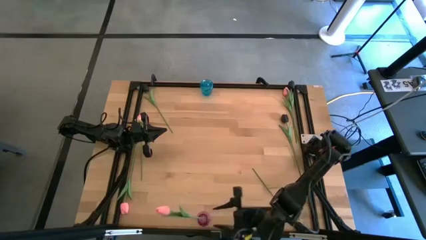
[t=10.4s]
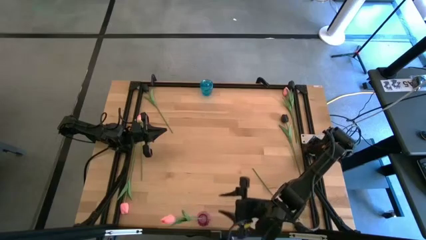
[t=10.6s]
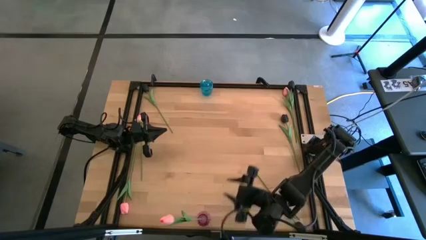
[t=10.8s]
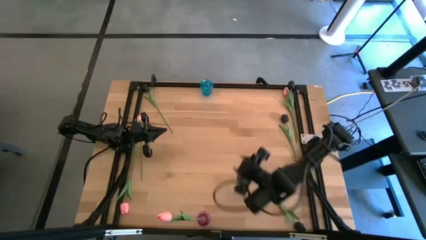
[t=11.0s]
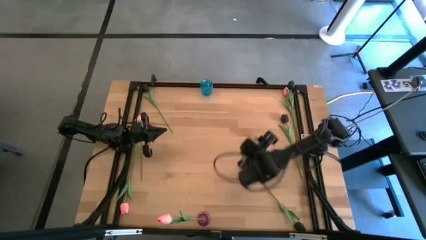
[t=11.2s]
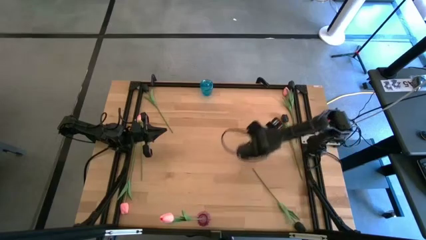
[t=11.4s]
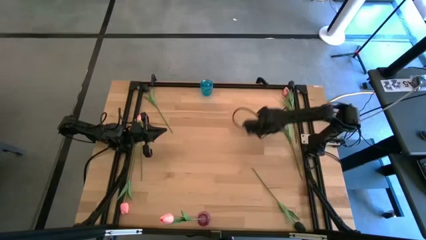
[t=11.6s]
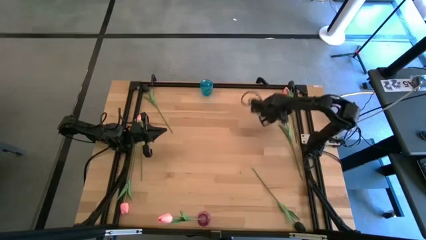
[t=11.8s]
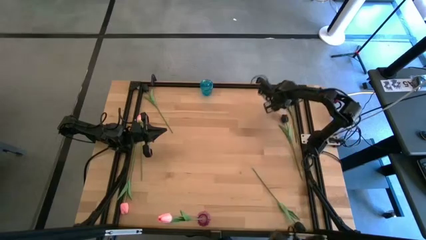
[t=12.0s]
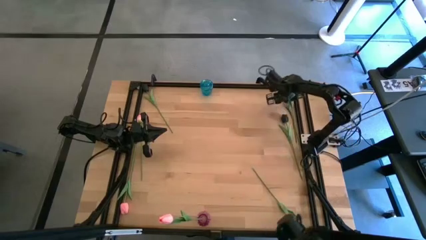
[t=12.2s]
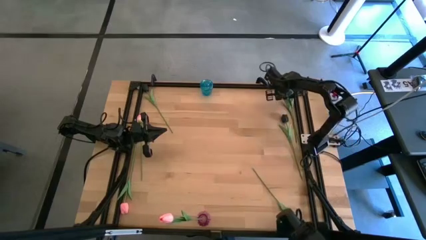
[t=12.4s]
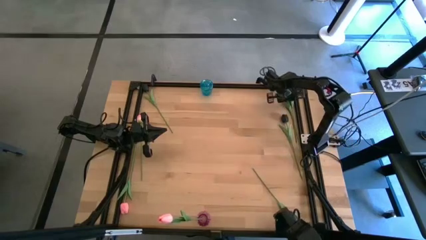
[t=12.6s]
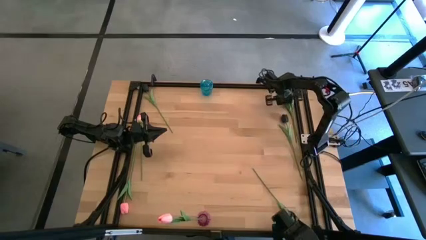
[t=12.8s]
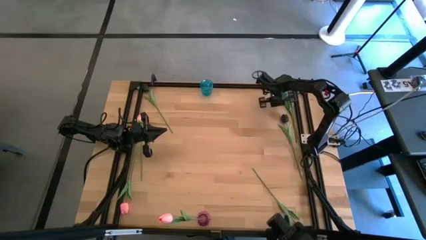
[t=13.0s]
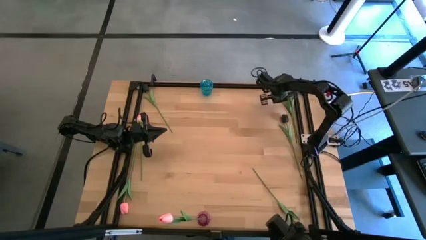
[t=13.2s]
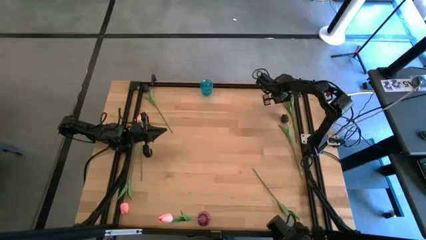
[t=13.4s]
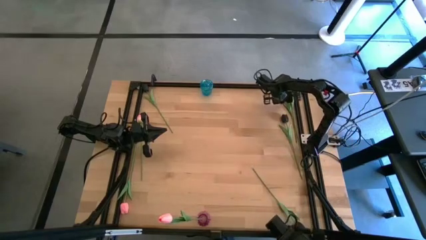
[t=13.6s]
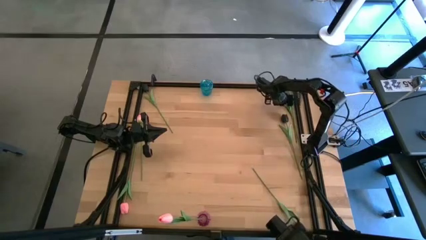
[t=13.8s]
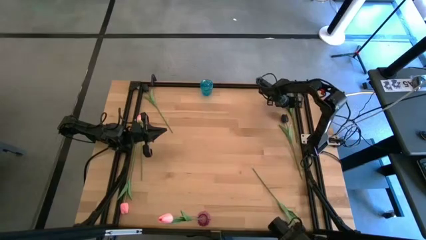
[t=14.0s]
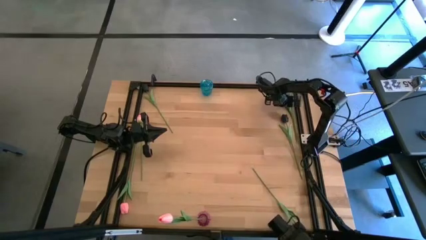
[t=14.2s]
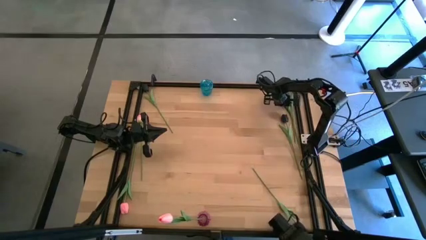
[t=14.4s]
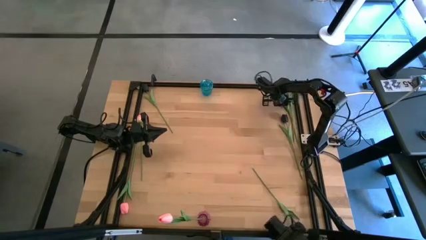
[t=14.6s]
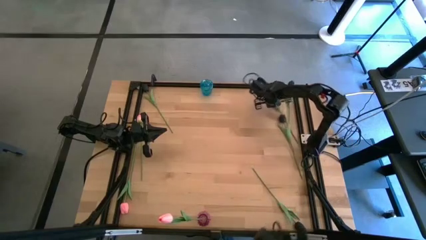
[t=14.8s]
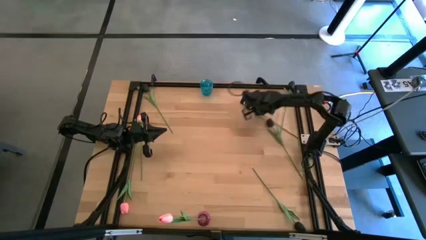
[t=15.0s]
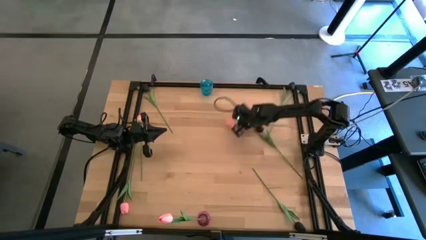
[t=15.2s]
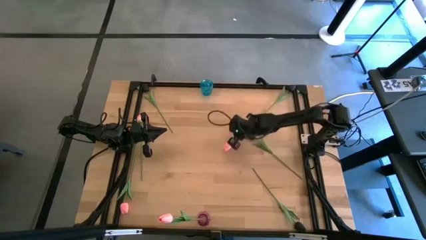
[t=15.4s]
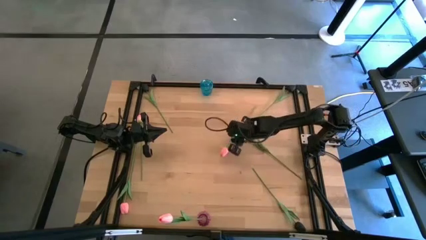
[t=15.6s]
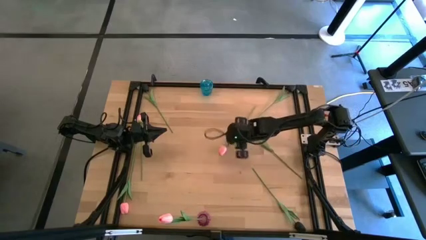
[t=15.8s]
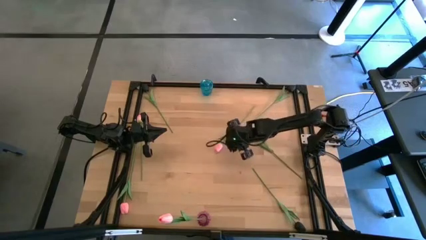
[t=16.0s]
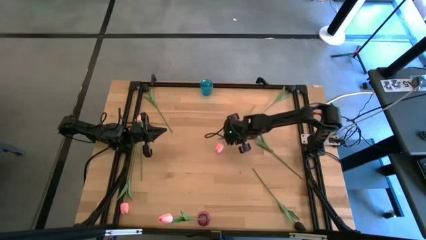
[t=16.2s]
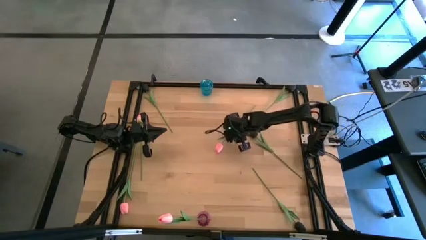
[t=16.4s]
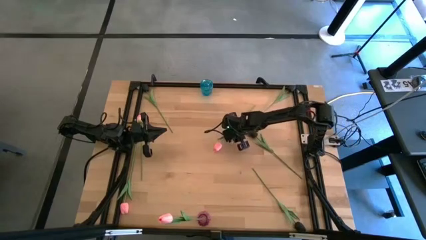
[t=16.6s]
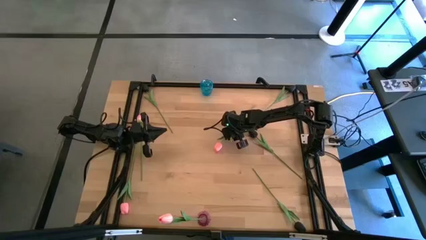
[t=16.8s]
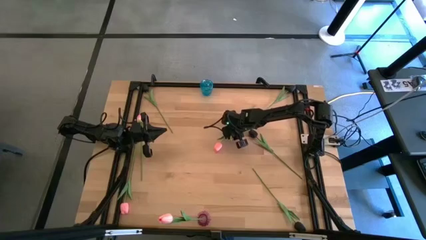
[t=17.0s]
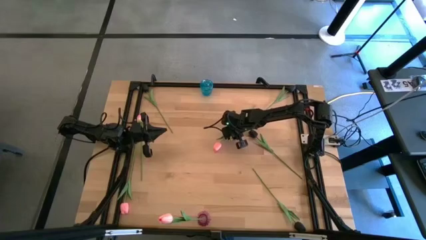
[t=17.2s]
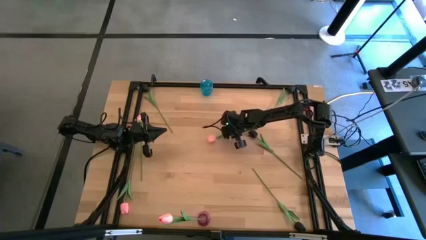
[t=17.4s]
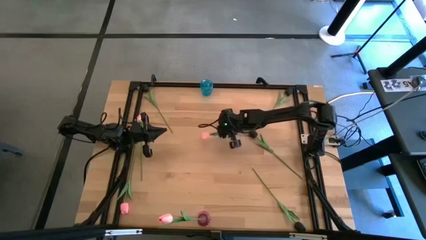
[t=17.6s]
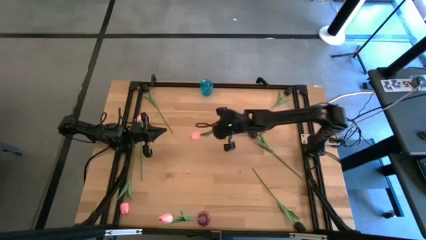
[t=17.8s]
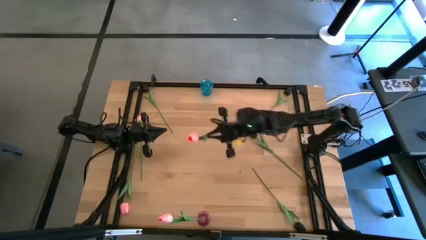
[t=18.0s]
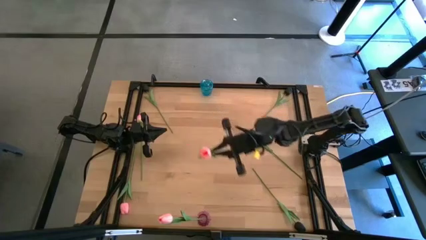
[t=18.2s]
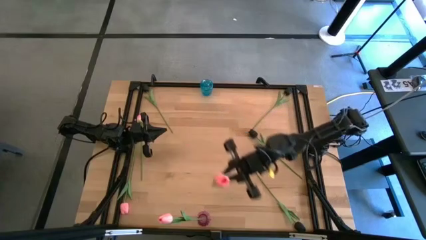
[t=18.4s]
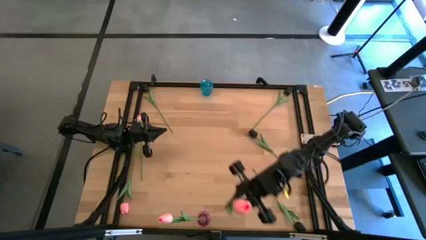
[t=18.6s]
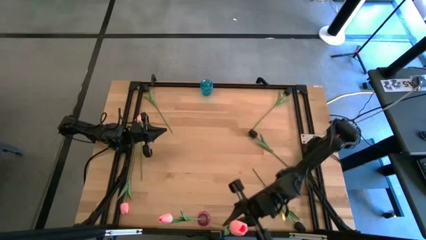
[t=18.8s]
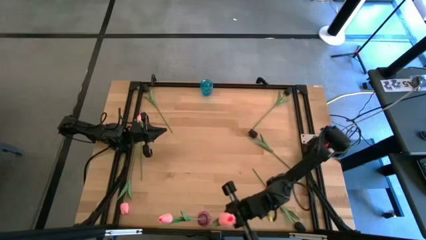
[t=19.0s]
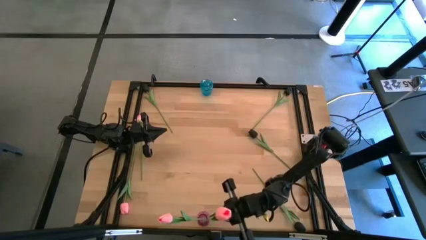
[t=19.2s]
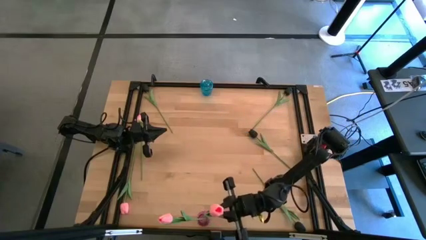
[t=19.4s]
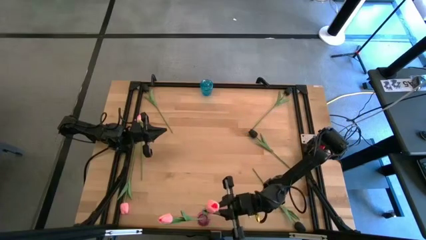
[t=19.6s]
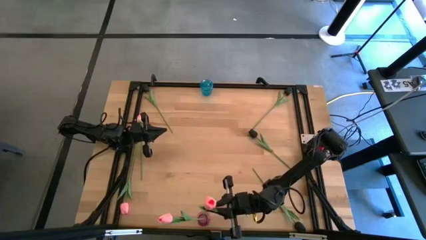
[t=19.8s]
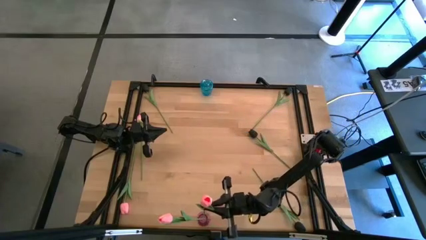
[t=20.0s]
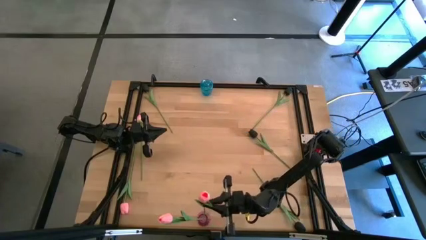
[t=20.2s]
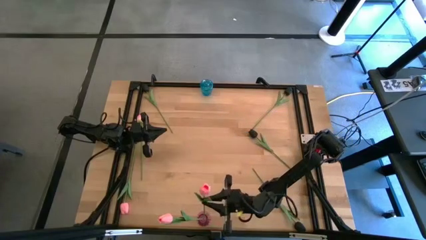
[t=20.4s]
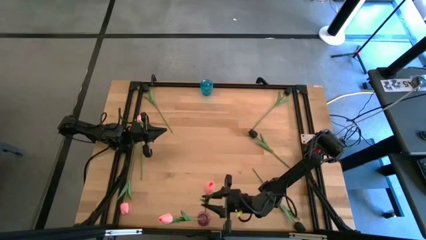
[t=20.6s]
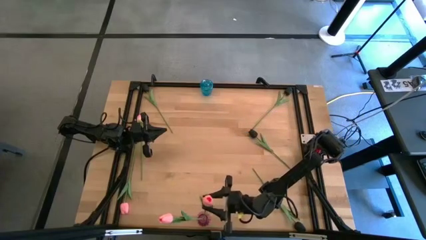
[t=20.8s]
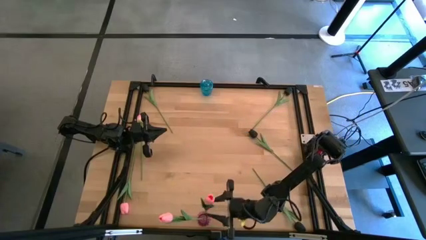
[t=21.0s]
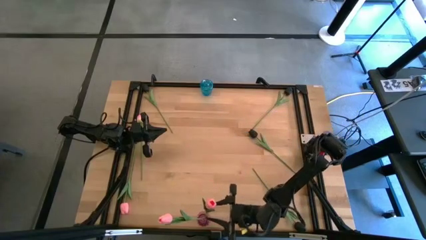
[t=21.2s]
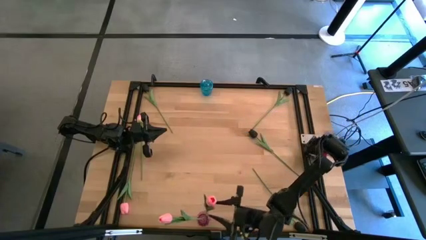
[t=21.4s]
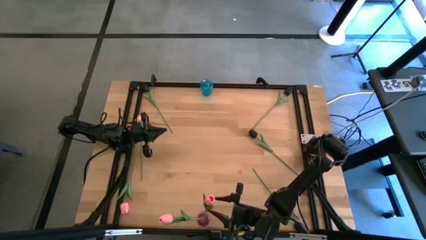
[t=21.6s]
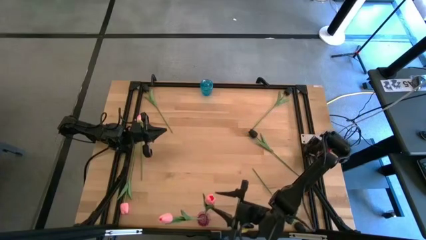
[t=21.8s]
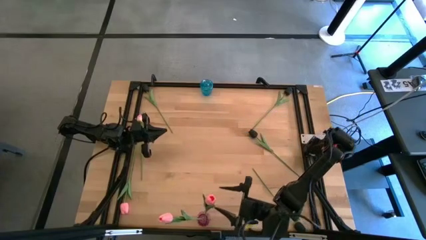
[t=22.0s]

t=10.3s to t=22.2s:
Task: Sort flowers into vase by color
Put the top right pink flower into the violet vase
